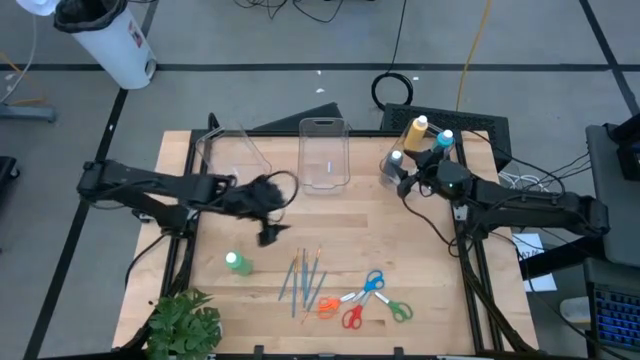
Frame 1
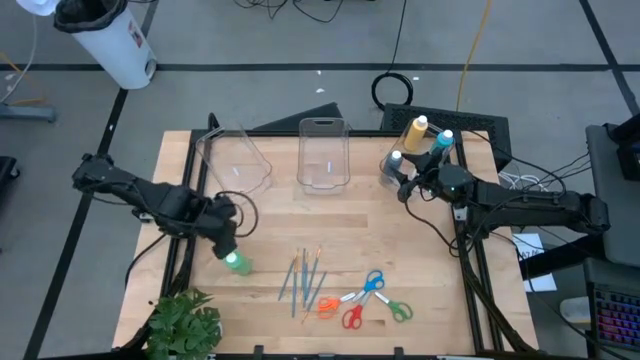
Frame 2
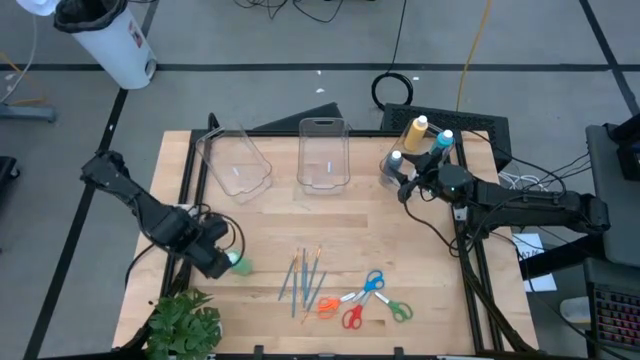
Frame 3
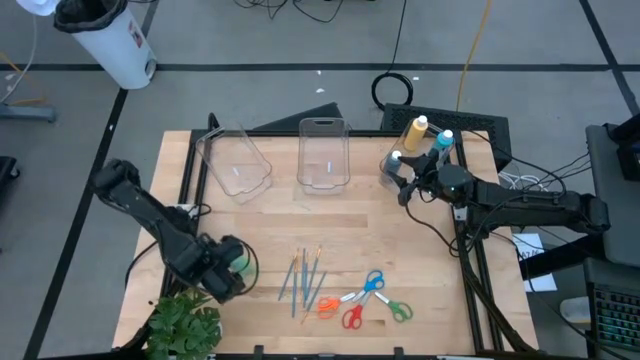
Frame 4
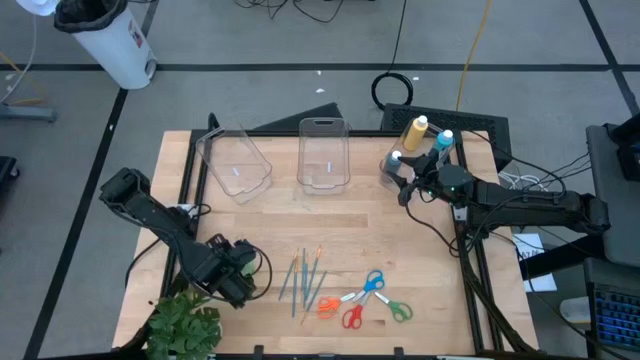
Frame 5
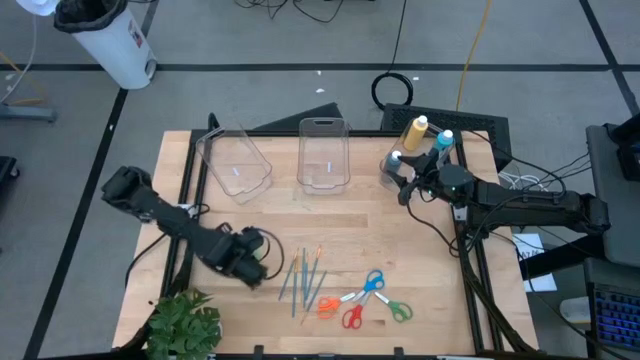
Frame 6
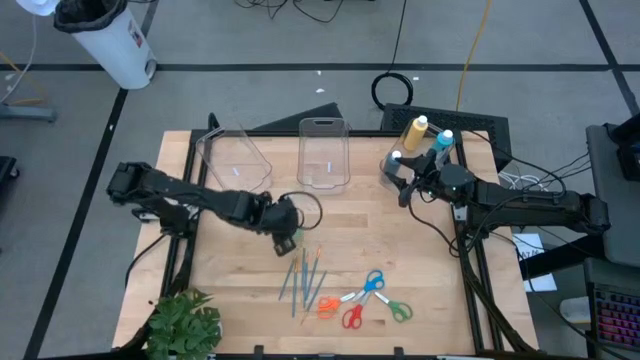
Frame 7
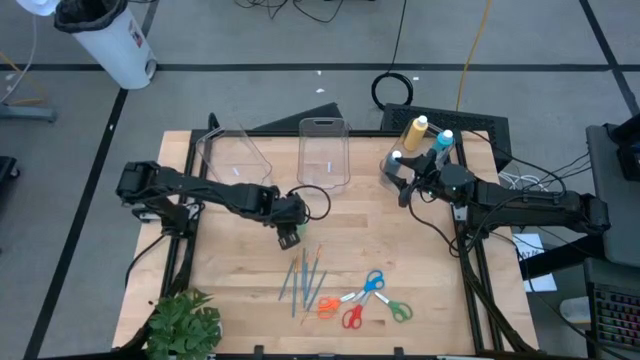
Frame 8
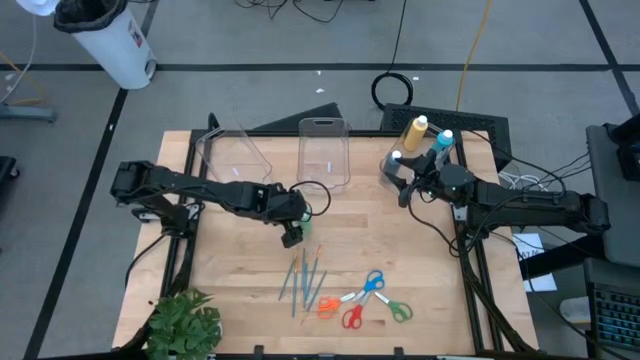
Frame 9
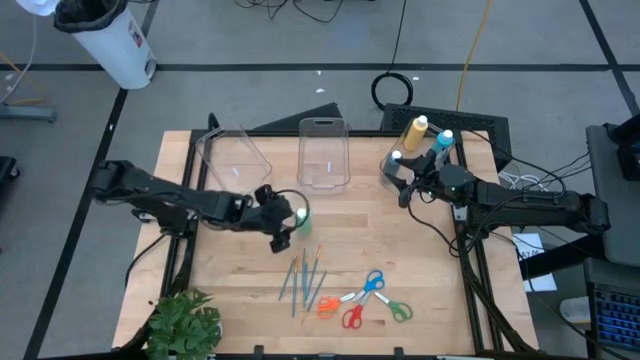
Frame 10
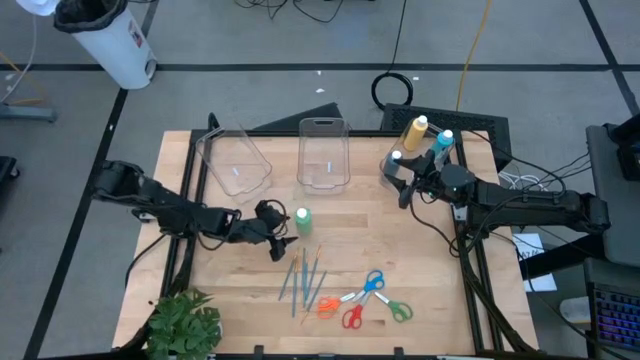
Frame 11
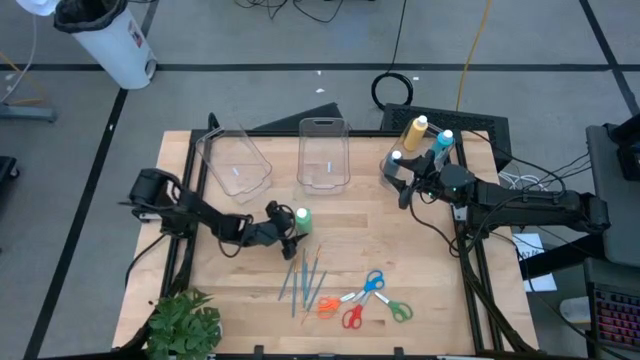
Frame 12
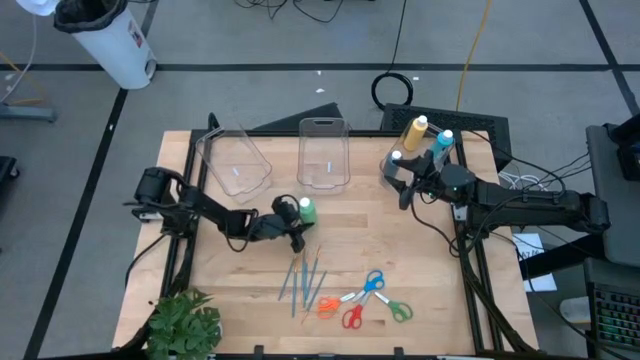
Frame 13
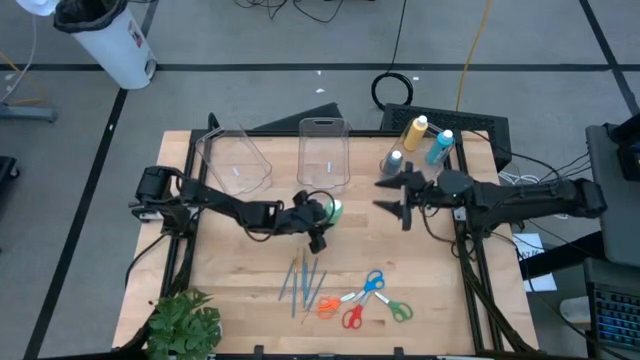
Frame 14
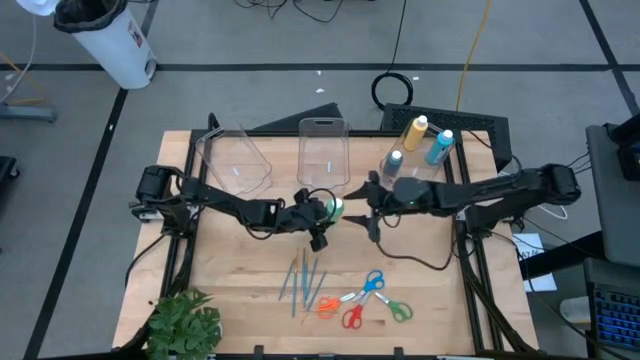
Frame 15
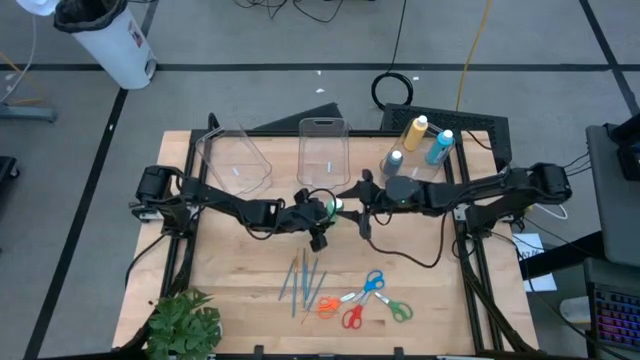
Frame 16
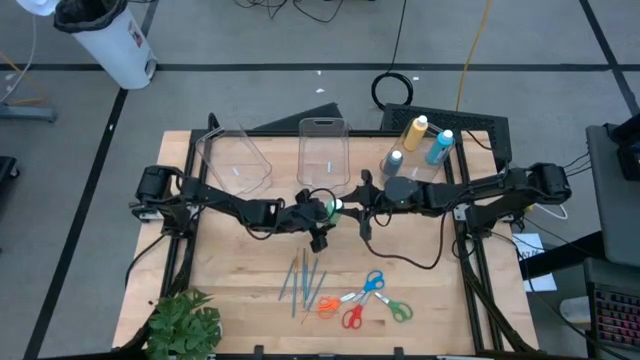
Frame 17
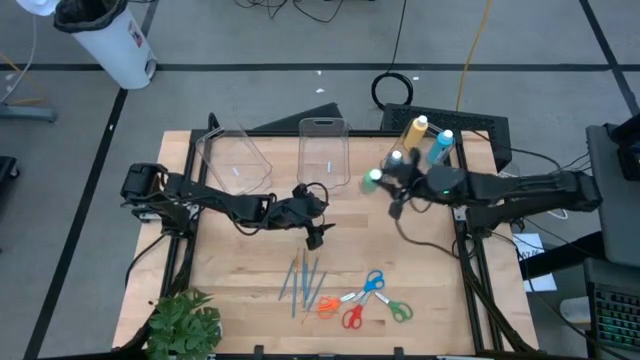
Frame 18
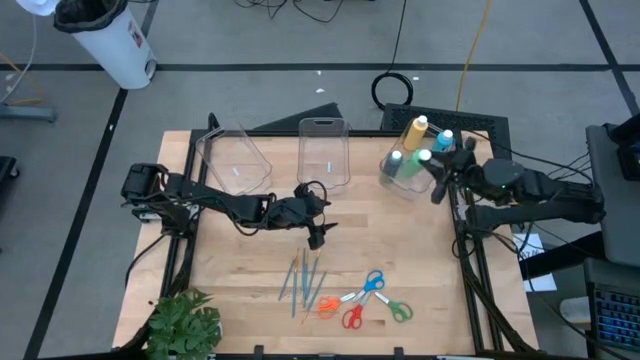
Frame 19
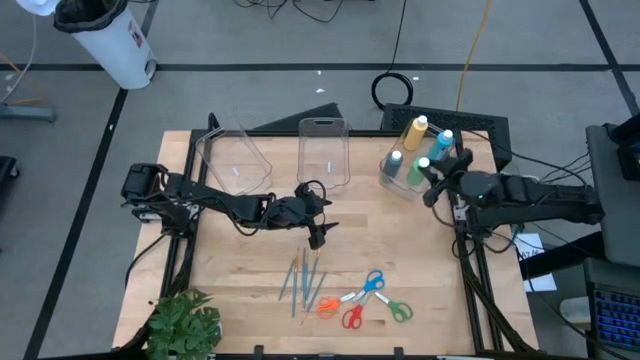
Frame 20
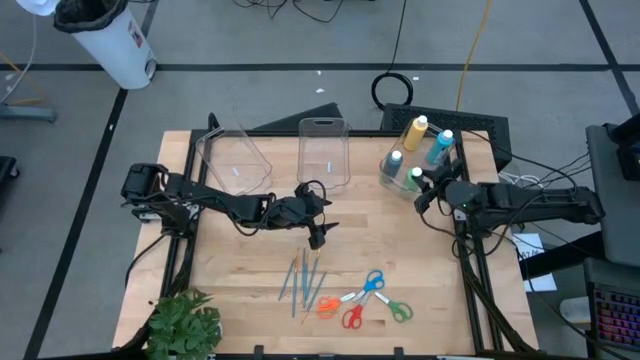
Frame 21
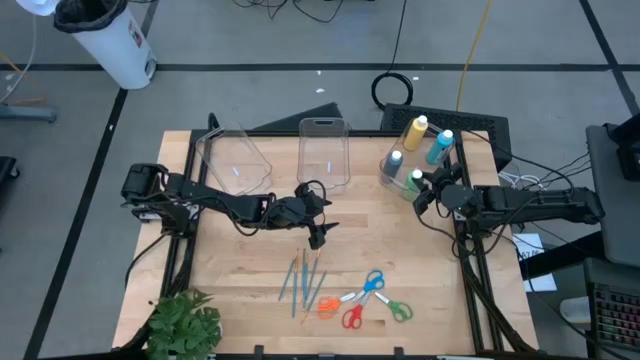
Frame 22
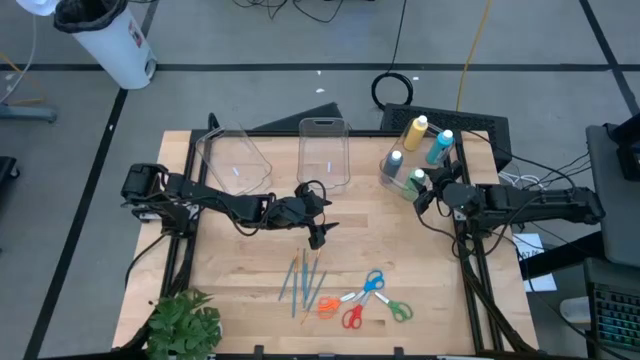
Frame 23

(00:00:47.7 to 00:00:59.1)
Task: Pick & Place Paint Supplies
Put the green paint bottle into the right transparent bin

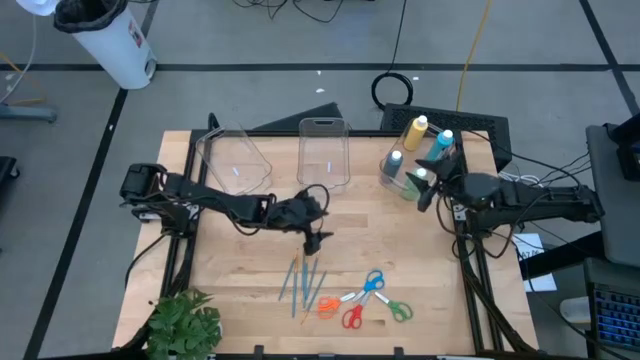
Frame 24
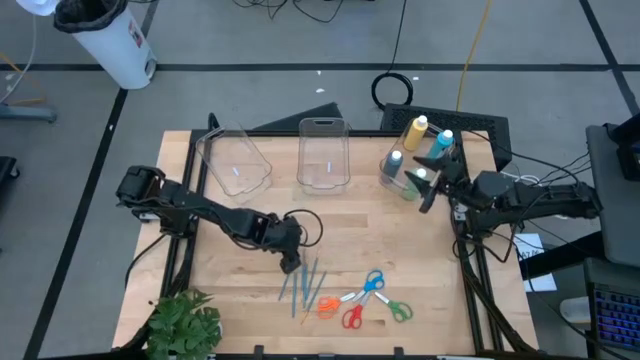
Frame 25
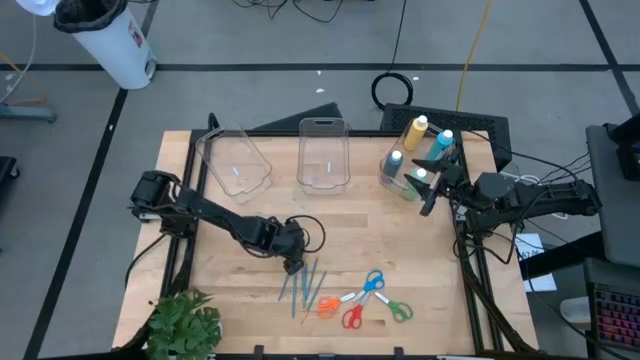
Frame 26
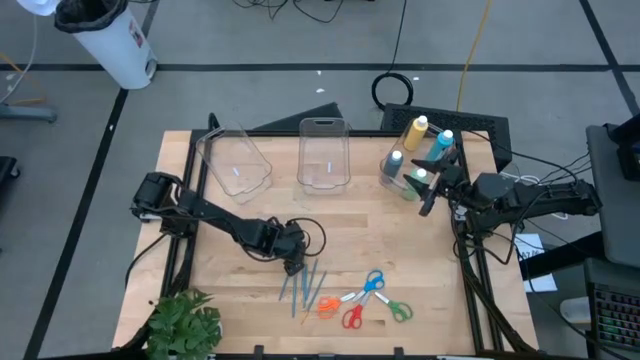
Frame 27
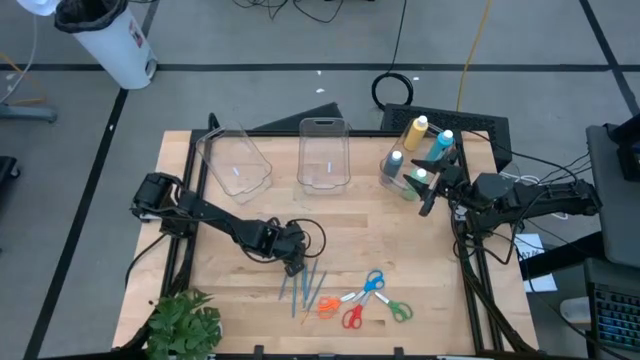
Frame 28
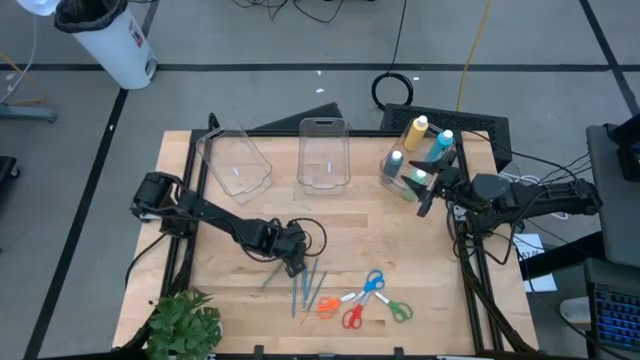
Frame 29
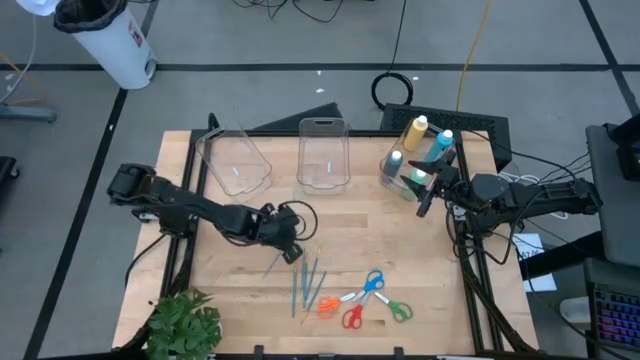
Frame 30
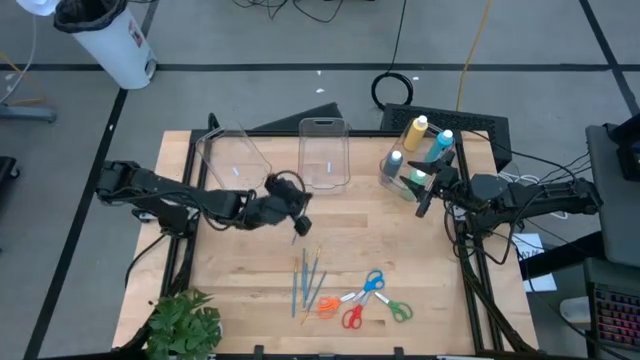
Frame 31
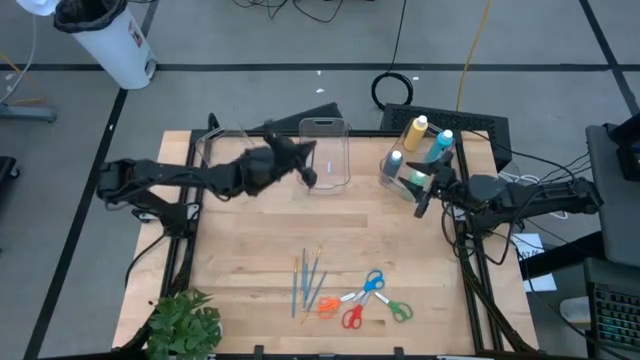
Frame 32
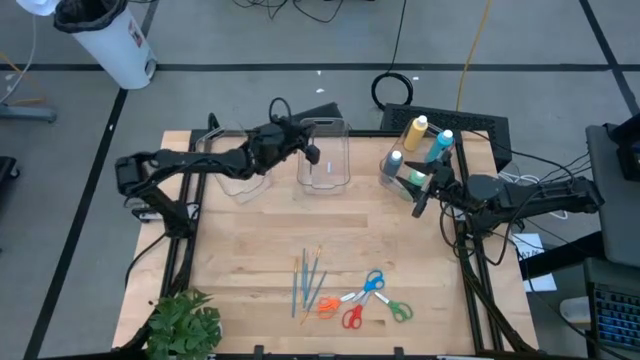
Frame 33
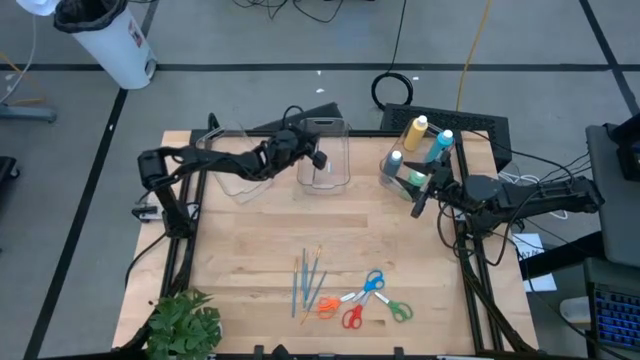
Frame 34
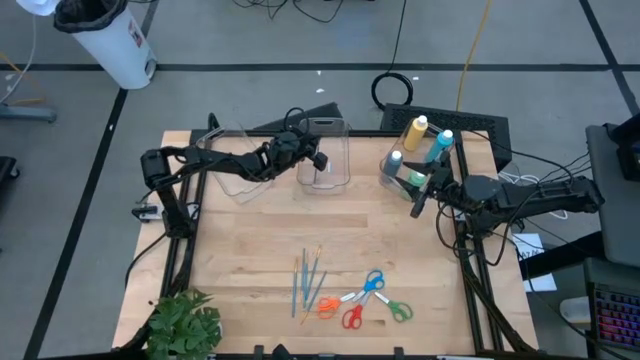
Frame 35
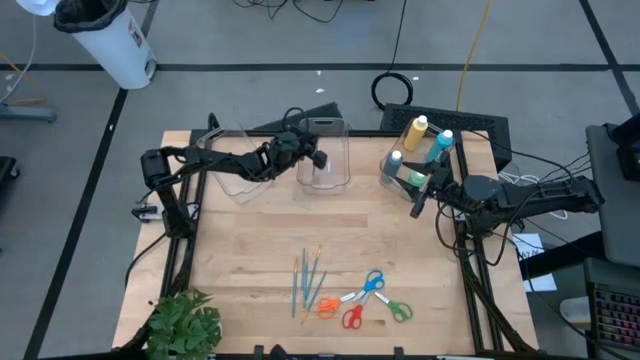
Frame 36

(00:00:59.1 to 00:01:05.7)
Put the blue paint brush into the middle transparent bin

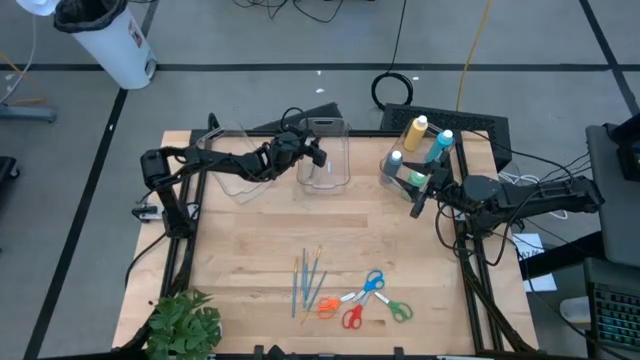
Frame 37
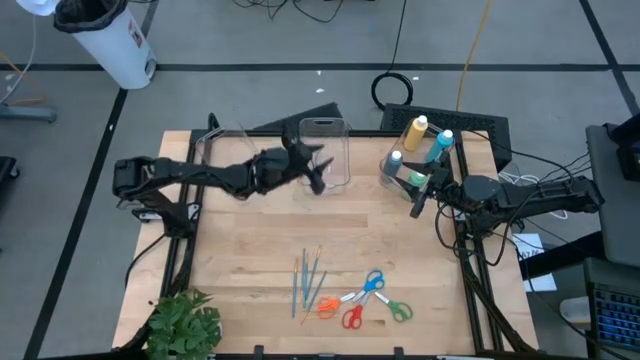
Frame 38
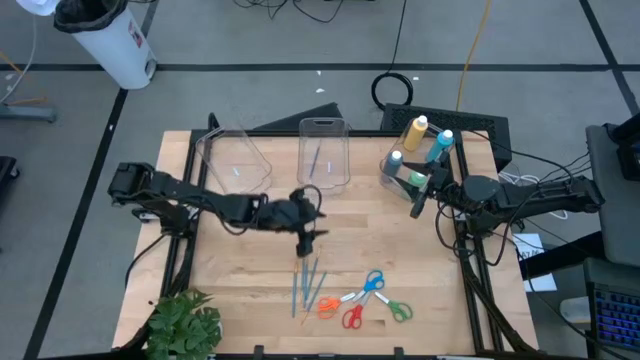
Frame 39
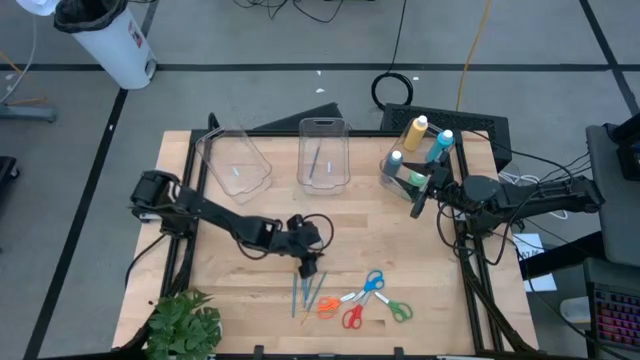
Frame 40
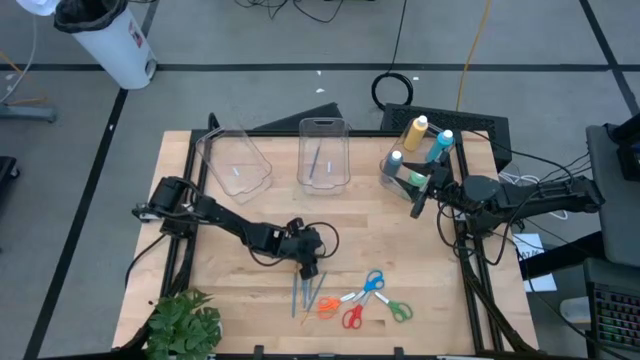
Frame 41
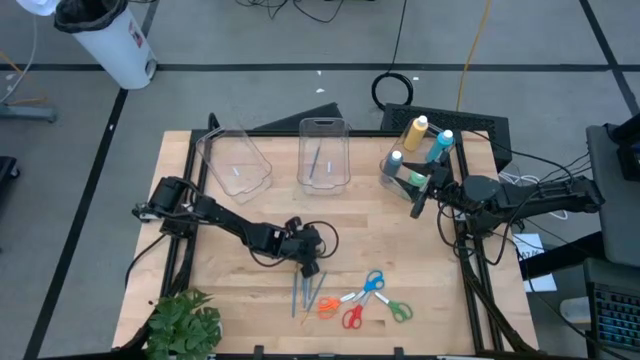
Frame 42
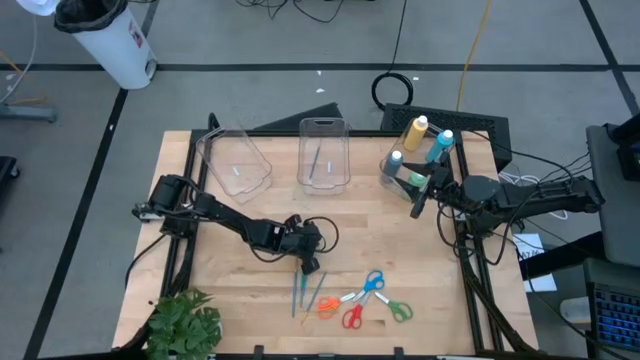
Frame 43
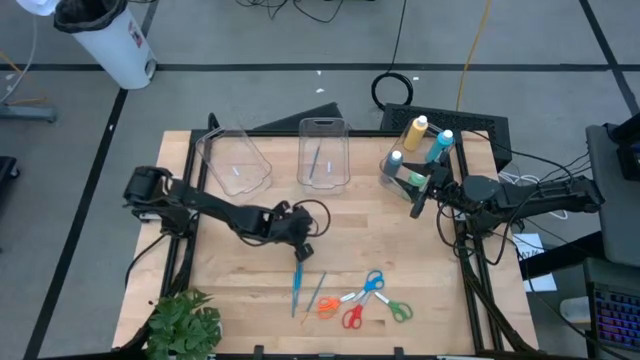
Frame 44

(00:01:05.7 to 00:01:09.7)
Put the blue paint brush into the middle transparent bin

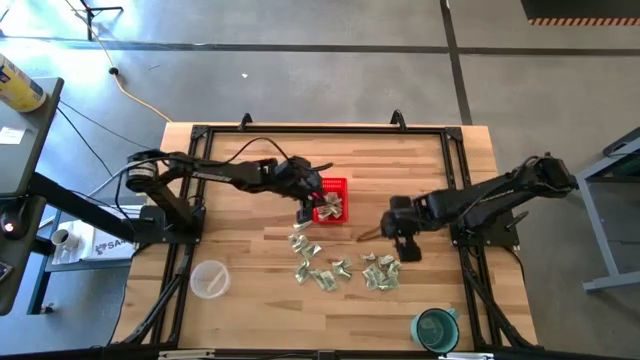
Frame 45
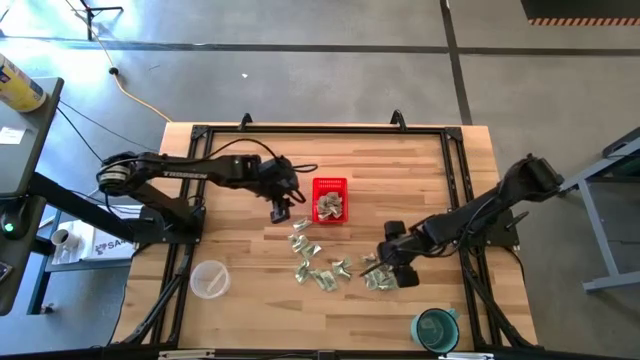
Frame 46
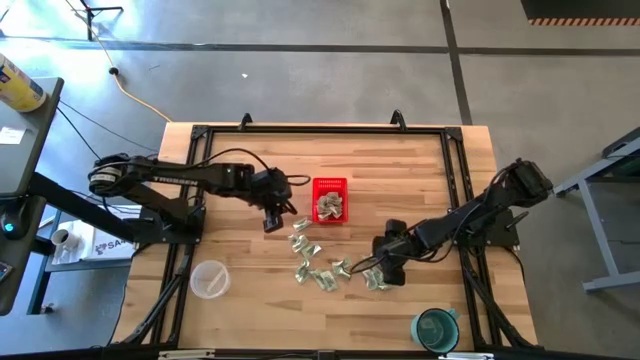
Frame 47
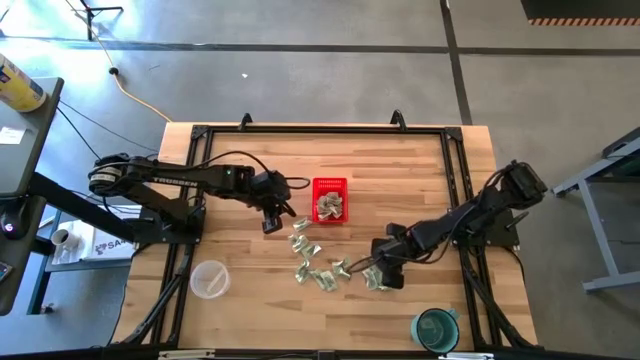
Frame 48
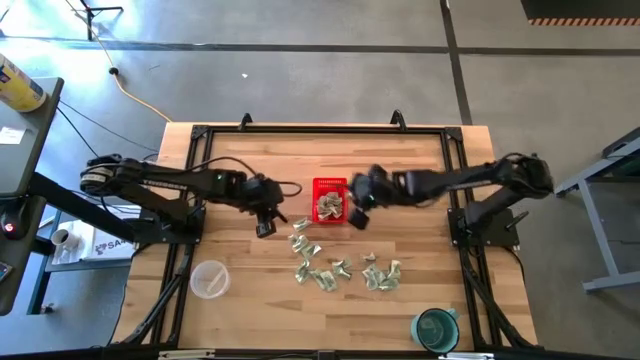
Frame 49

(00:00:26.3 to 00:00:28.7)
Task: Pick and place items into bin
Put the green truvia packet into the red bin
